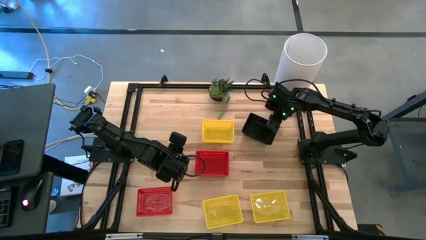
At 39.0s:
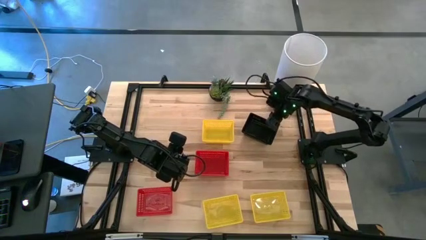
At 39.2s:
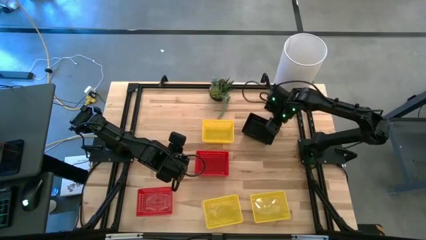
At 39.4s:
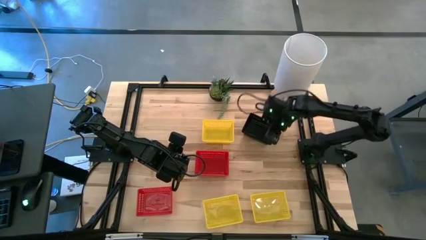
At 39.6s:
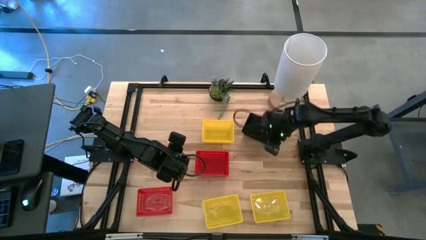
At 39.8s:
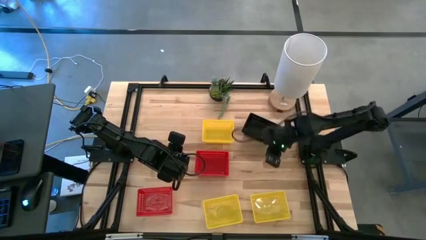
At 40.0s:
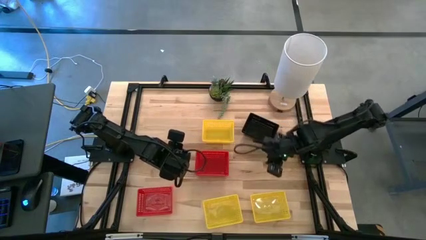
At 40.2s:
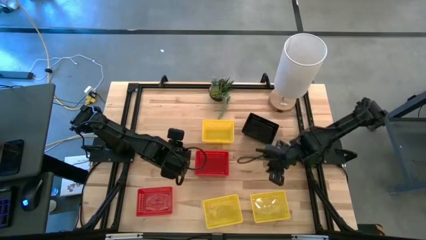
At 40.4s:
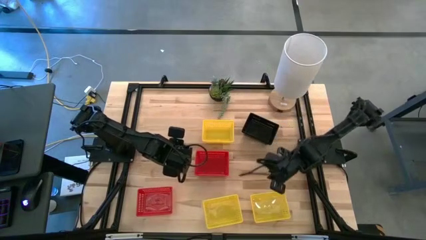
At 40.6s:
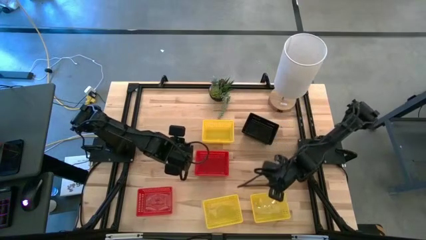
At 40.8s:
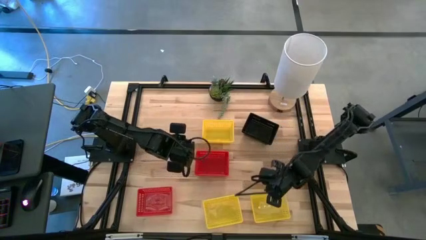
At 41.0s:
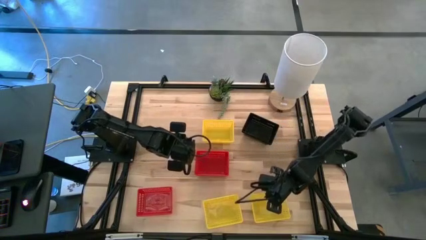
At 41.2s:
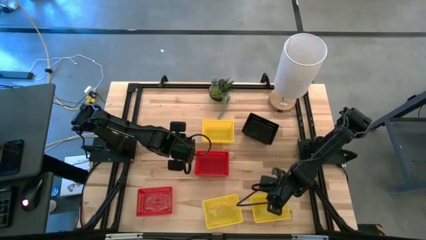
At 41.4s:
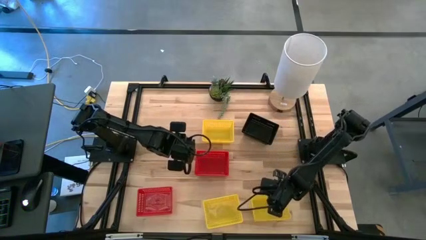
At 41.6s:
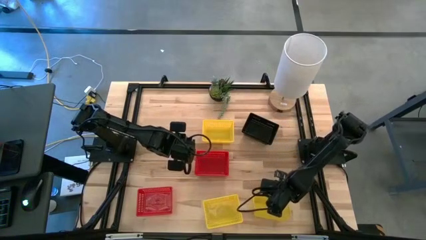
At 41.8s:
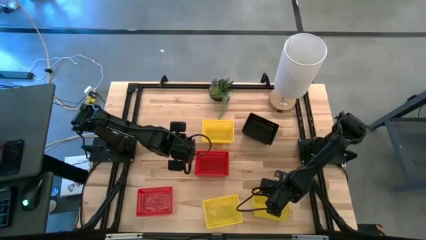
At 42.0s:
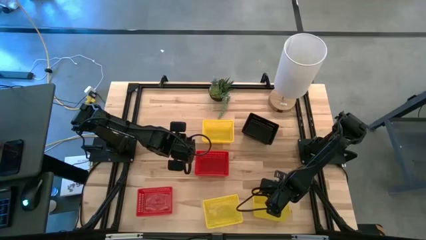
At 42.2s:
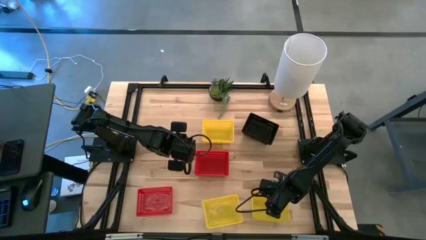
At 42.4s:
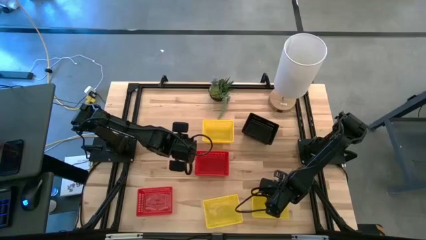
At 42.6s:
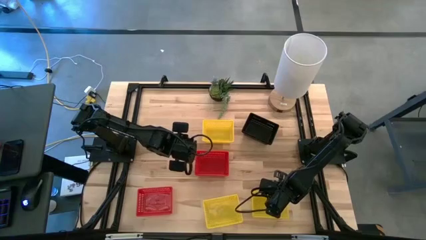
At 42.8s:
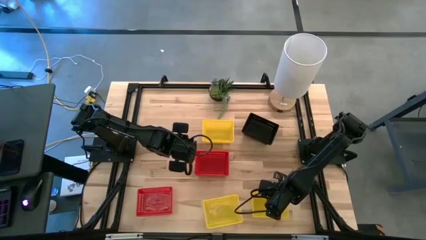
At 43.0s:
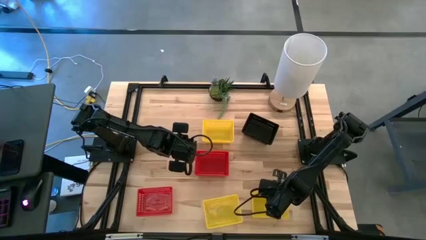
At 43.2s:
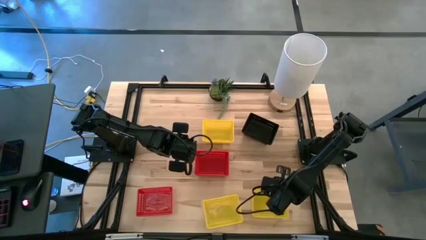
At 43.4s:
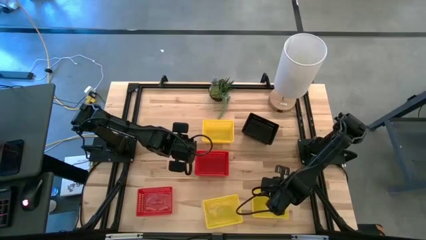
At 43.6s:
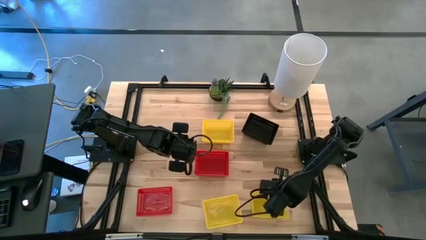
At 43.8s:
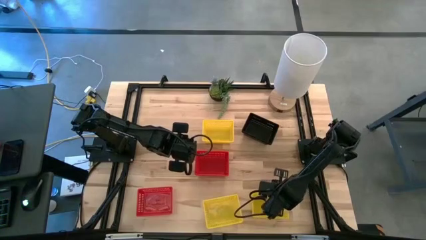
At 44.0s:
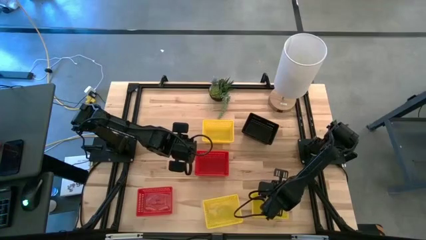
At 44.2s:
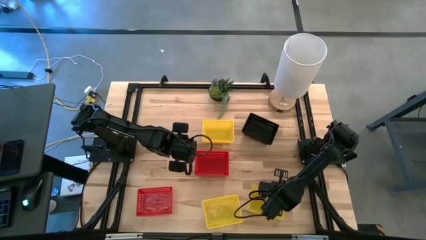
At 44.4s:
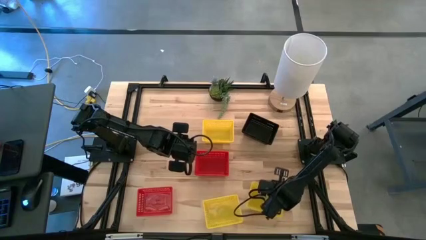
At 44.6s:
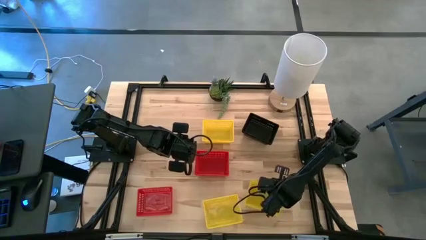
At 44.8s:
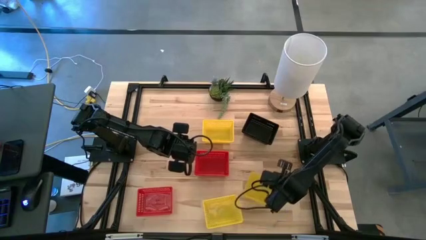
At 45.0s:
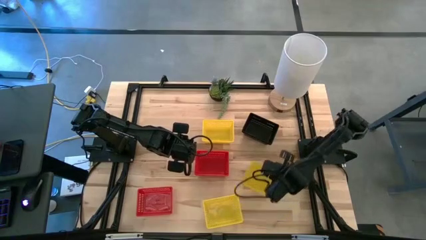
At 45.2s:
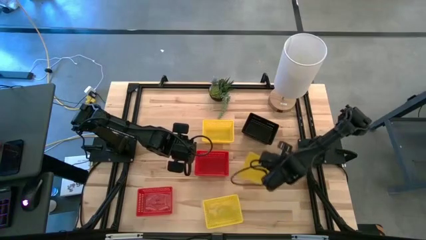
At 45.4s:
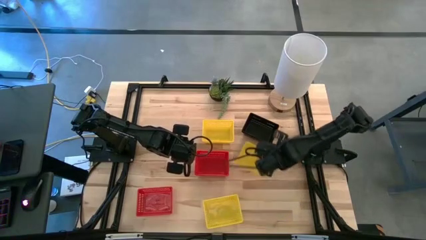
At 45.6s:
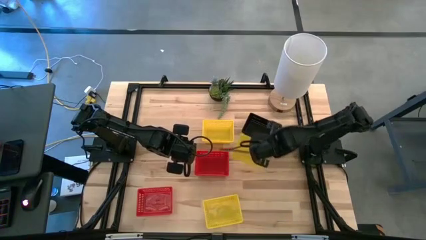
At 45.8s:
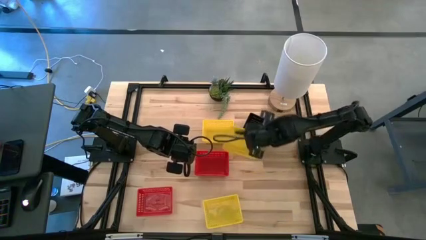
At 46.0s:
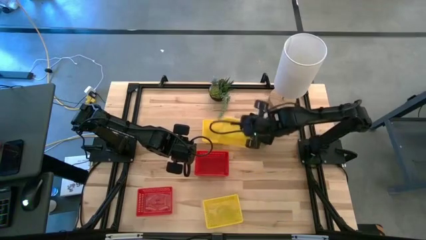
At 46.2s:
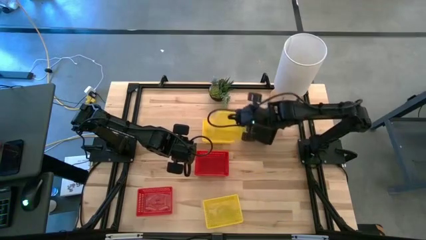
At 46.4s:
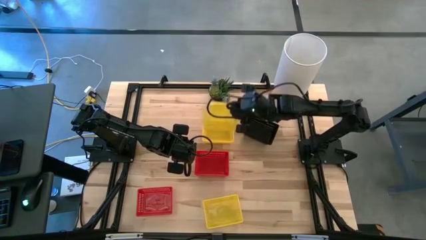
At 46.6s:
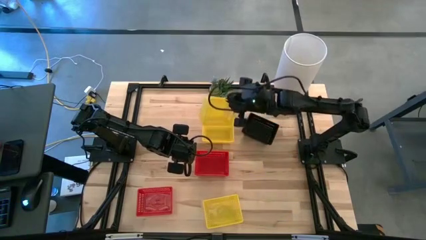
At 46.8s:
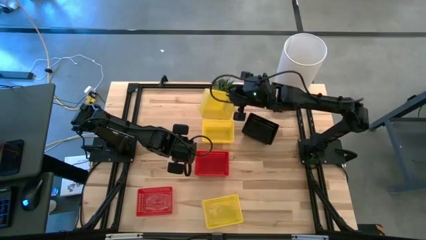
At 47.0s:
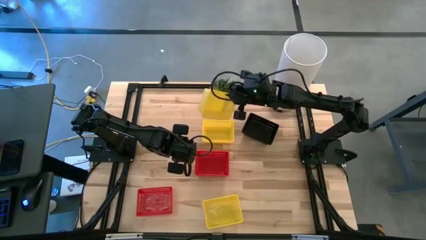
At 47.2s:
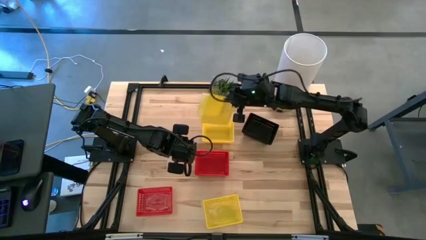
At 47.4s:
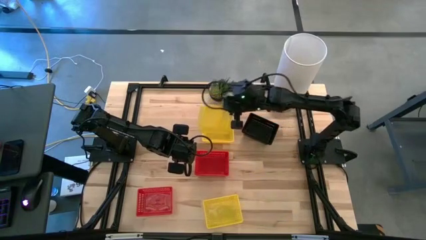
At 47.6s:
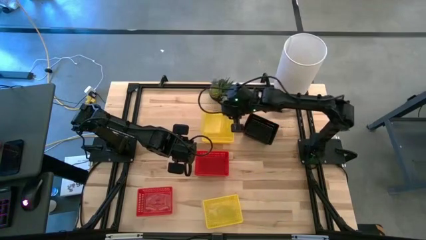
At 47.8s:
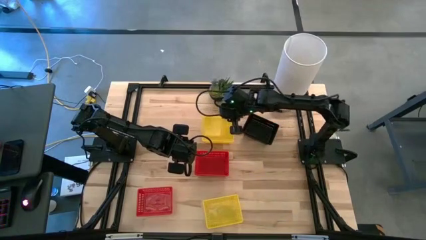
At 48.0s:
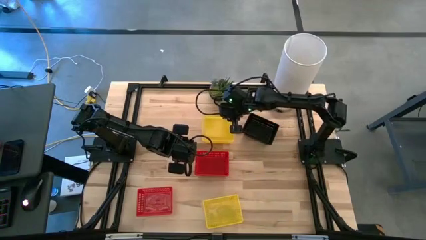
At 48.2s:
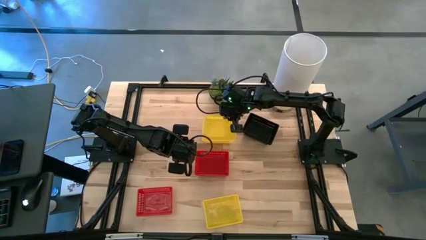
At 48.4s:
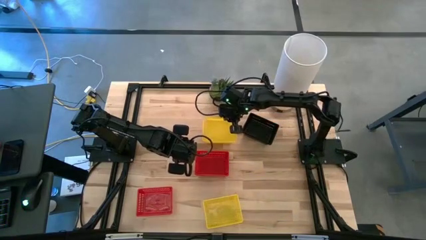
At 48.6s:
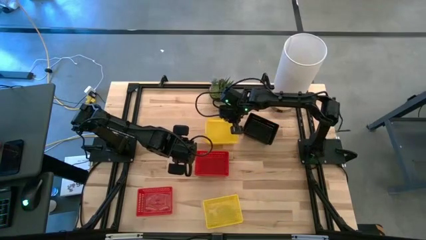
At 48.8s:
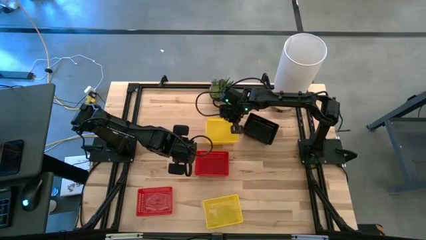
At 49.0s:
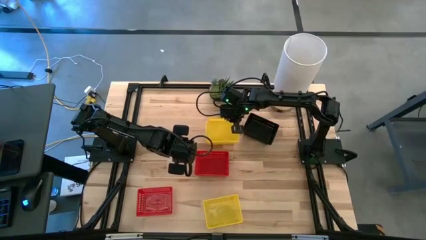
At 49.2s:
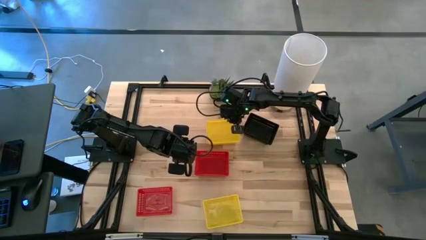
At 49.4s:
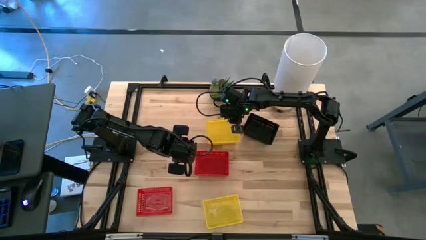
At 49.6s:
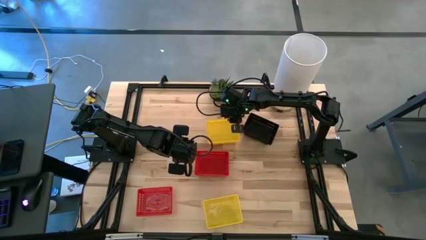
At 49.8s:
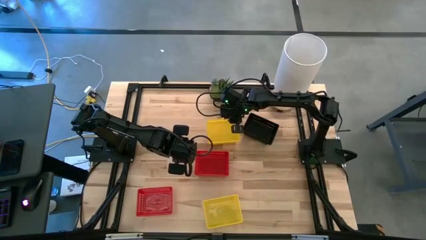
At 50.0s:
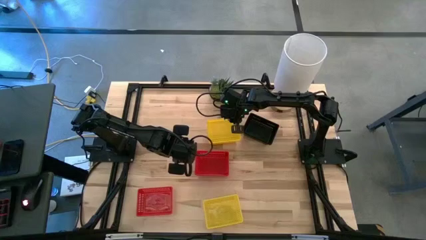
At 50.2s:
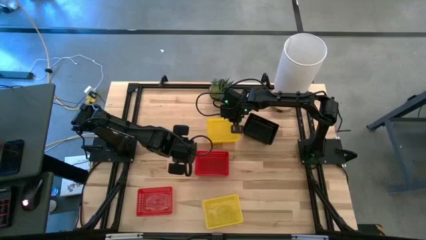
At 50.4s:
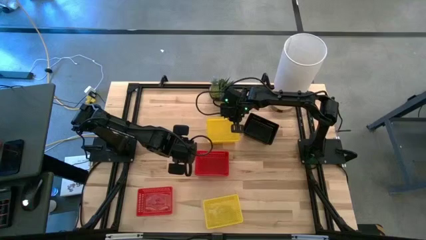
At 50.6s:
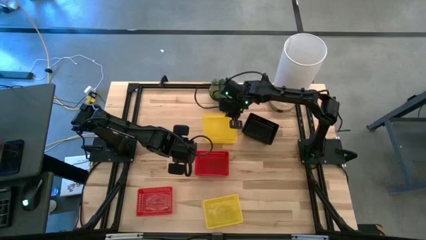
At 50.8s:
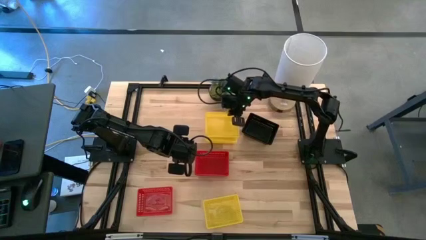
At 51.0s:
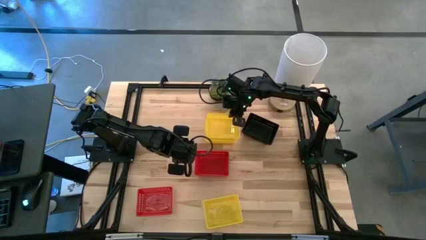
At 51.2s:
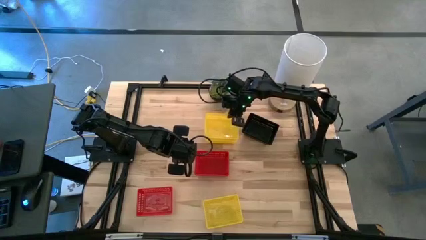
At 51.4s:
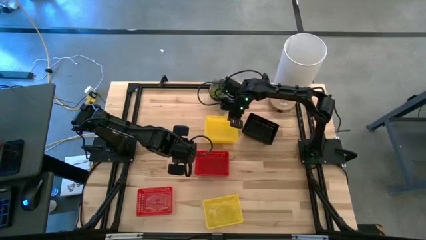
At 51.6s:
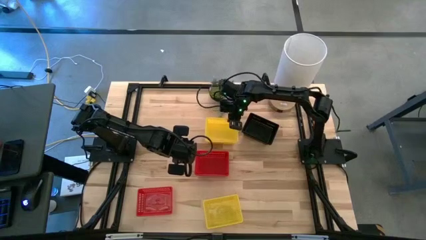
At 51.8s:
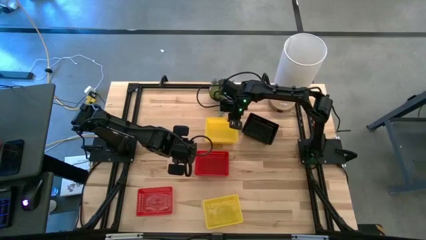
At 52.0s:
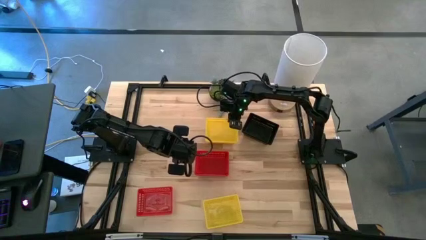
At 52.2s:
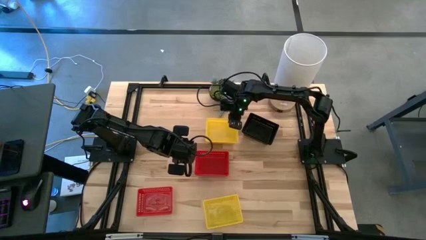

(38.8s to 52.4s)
Stack the bottom right yellow bin on the top yellow bin

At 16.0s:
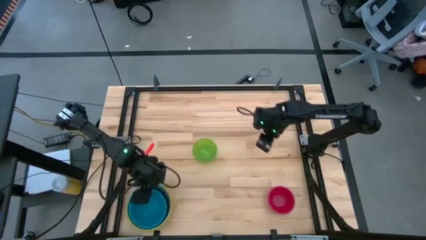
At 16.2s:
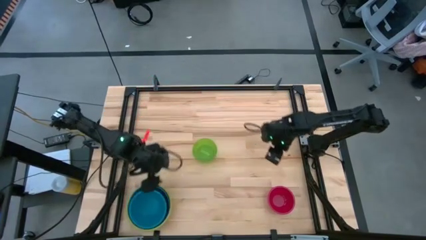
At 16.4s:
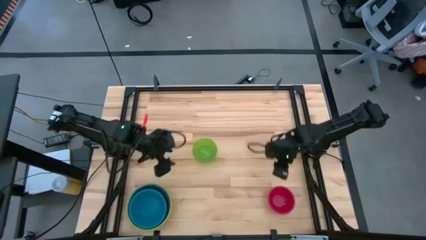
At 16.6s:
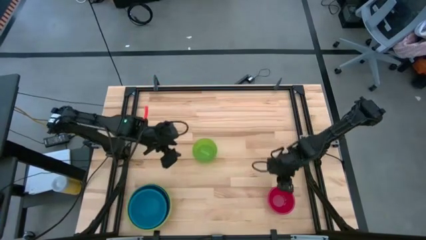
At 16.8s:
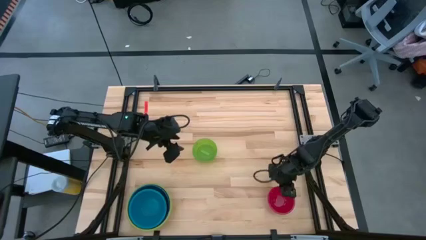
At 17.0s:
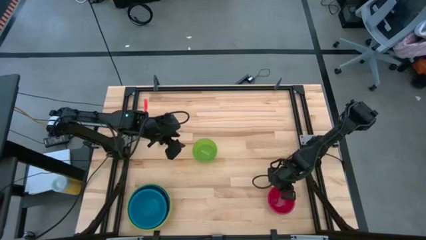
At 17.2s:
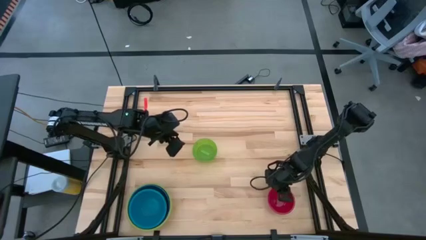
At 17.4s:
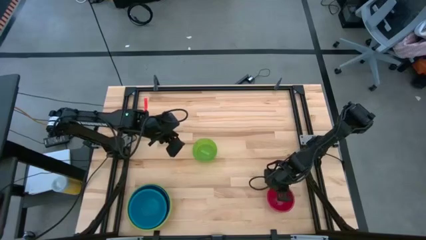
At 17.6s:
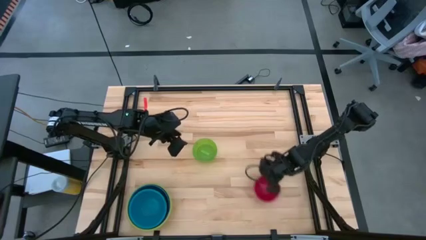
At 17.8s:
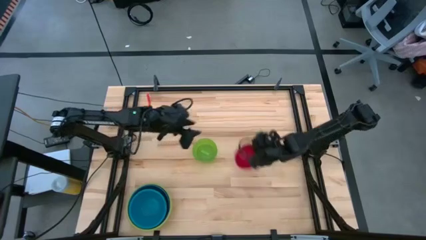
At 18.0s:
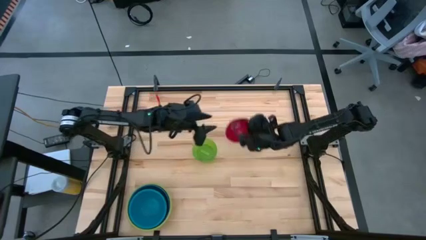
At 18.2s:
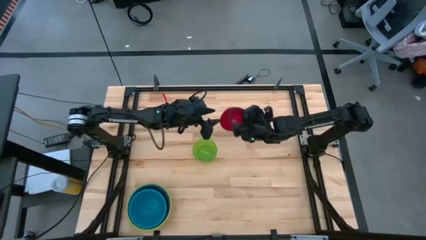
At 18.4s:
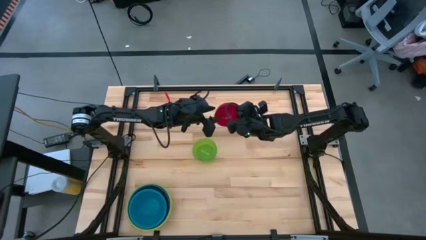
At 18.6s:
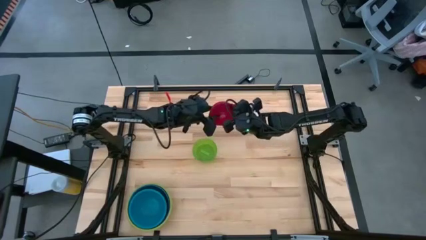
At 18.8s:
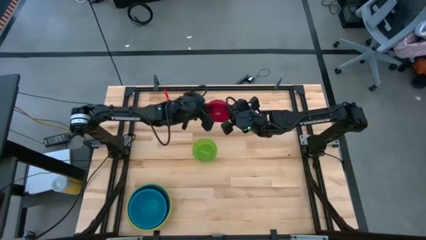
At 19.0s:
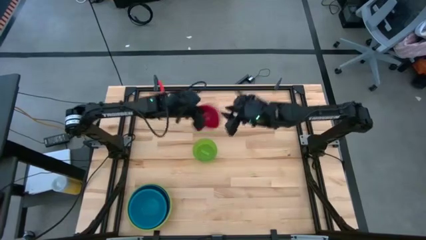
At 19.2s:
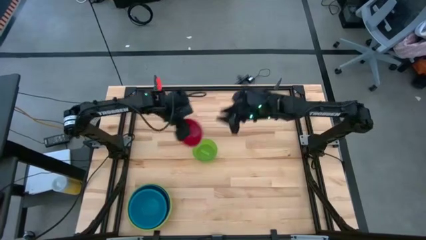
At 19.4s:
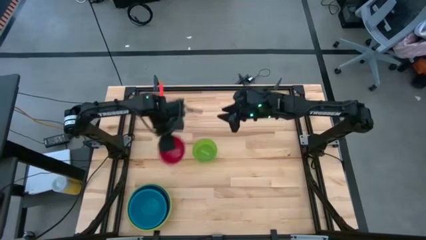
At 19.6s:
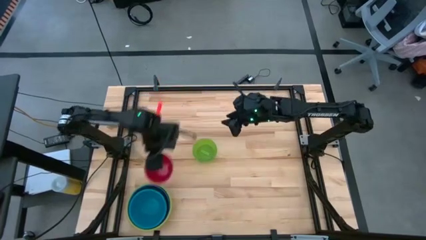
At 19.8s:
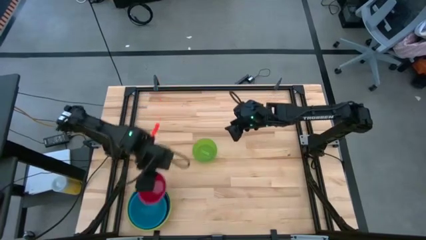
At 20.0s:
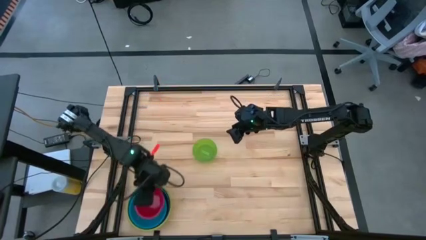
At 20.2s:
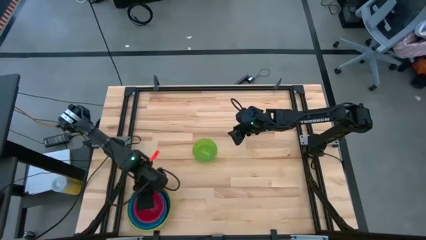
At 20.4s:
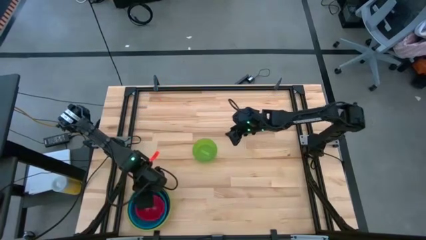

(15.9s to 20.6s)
Stack the red bowl on top of the blue bowl
